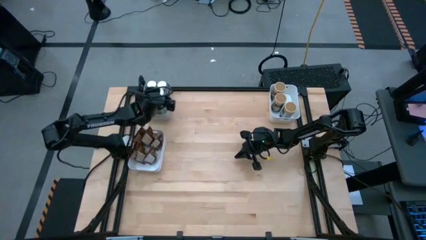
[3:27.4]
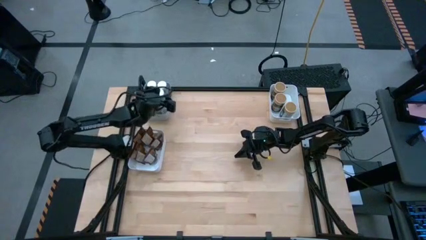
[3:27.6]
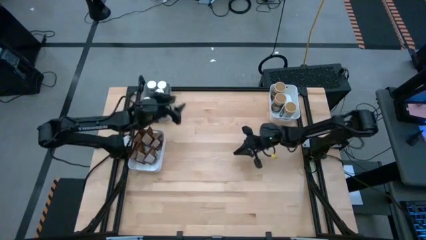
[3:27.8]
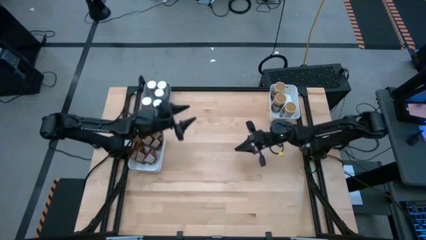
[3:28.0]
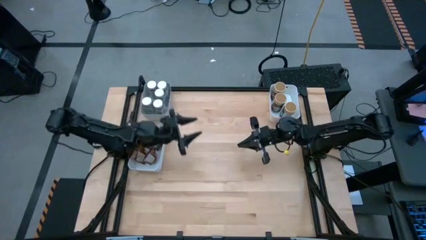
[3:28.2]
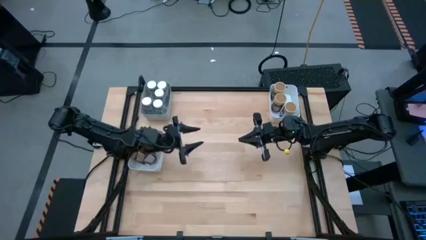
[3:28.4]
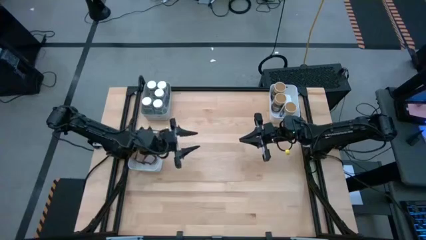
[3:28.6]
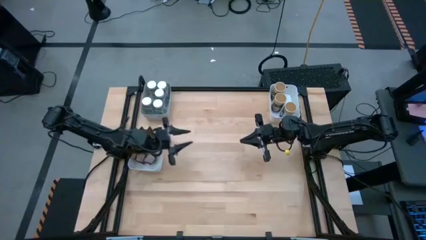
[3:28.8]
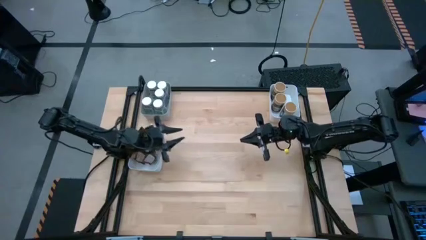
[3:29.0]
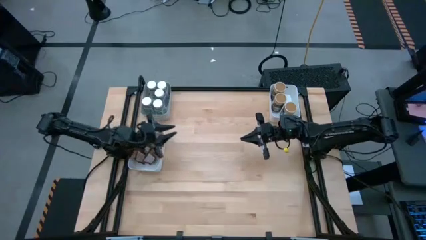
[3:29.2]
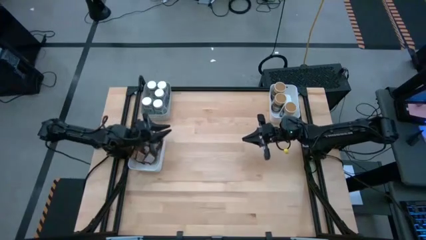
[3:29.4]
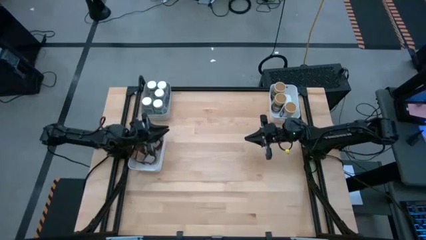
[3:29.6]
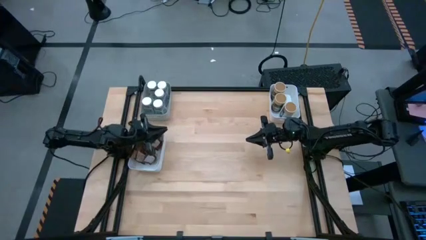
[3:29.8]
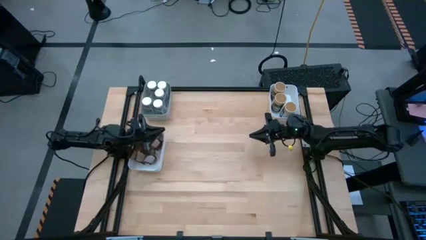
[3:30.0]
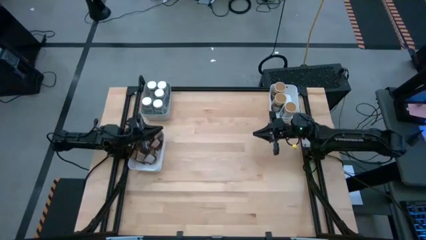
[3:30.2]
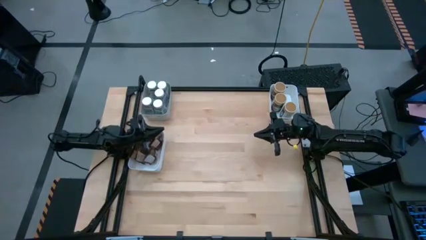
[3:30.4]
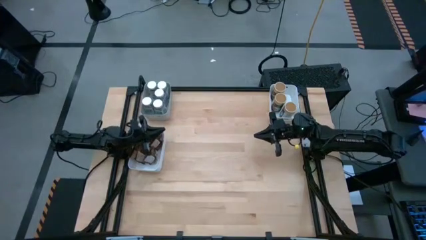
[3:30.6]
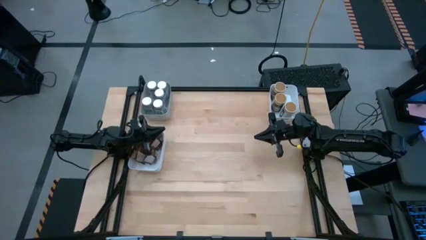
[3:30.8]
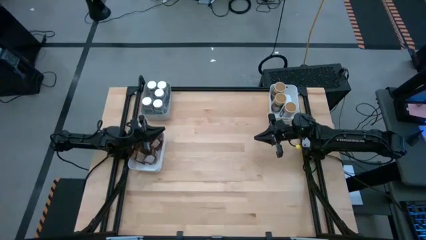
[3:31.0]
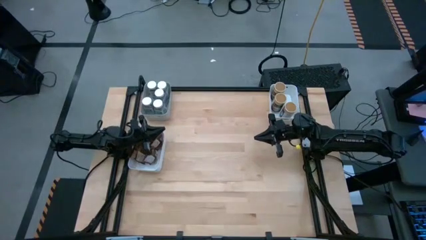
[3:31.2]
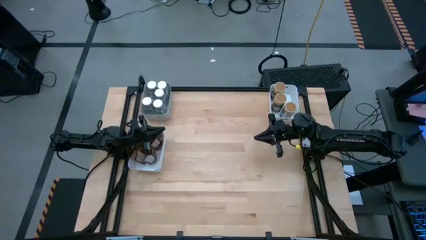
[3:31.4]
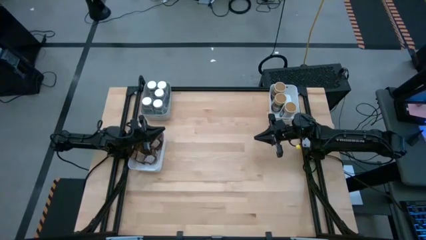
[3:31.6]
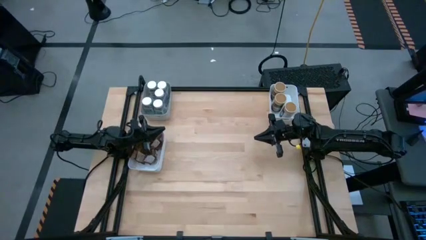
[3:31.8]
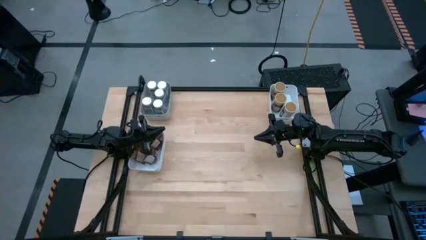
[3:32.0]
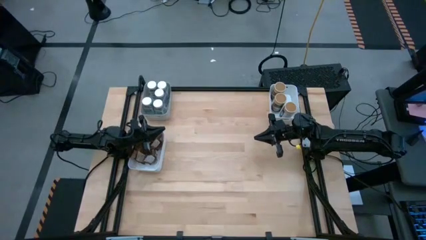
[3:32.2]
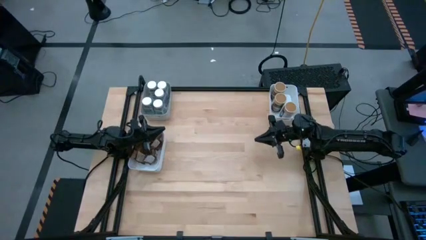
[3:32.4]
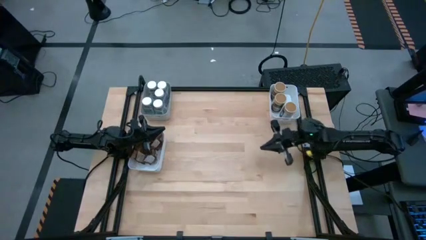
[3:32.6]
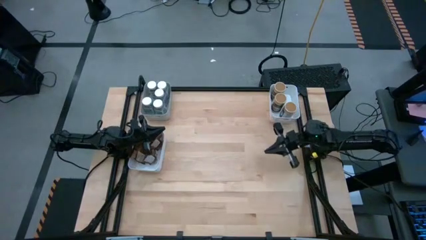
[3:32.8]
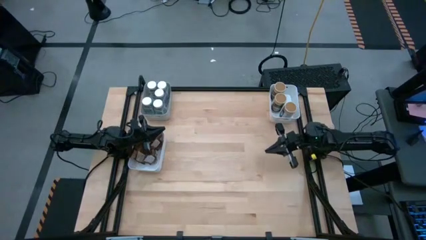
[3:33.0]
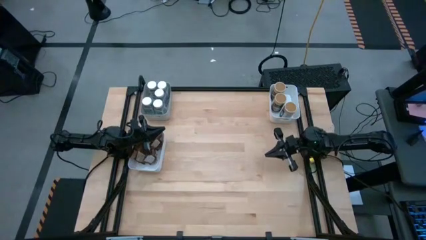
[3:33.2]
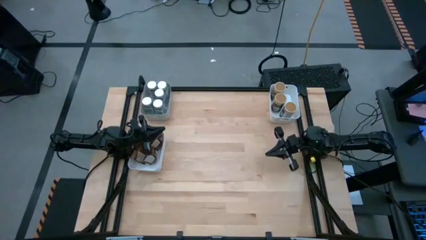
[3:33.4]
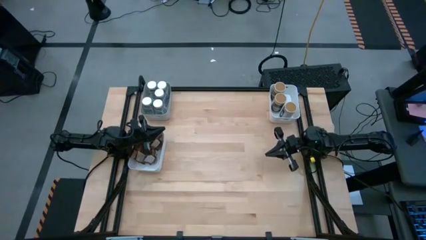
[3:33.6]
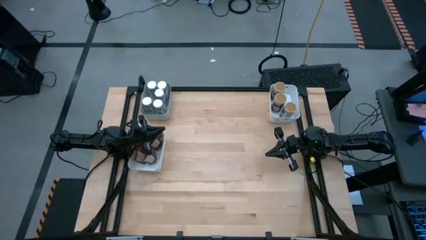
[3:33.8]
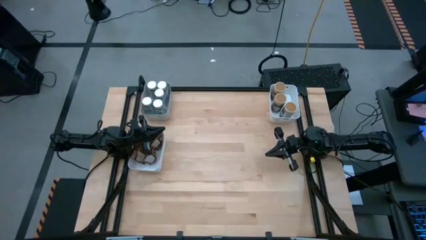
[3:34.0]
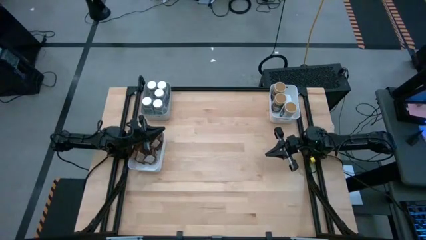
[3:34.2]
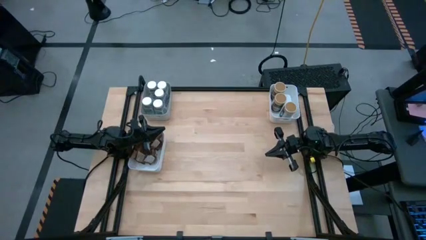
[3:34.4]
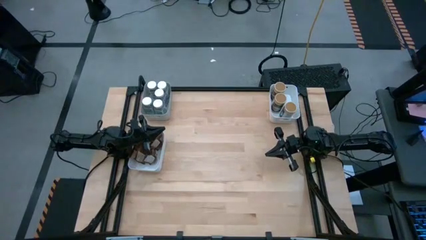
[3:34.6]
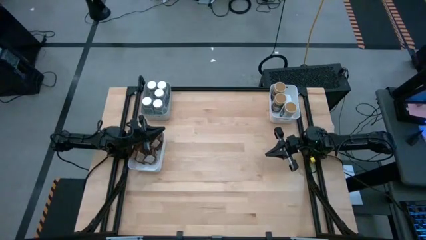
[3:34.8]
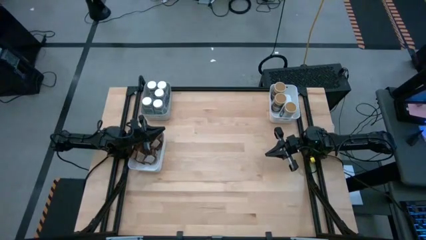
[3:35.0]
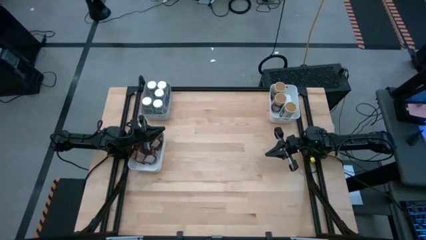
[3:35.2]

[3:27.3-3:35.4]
Task: Sort spices by type
Return to Home Position

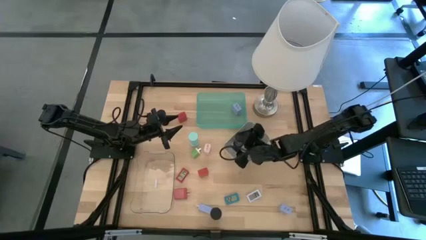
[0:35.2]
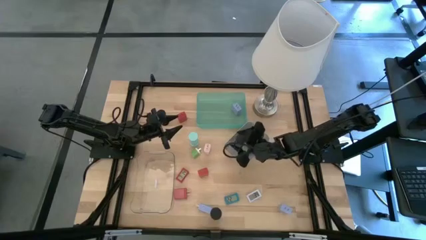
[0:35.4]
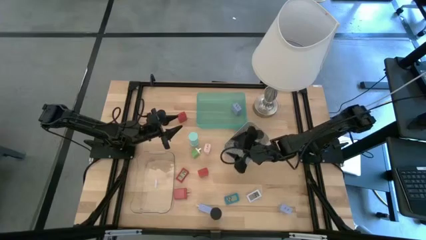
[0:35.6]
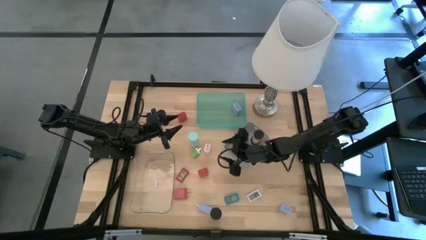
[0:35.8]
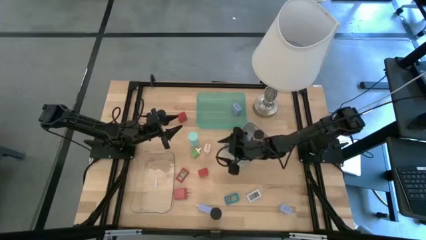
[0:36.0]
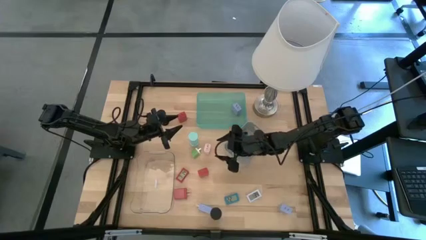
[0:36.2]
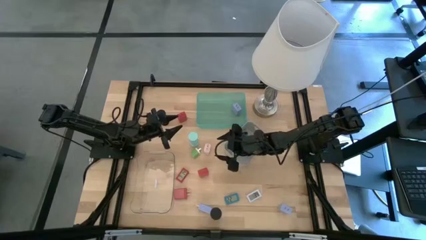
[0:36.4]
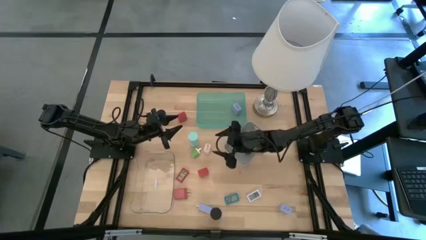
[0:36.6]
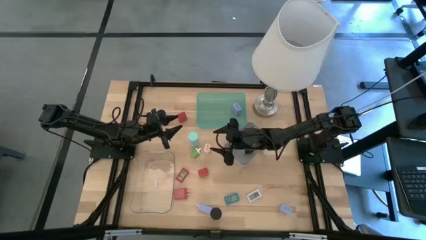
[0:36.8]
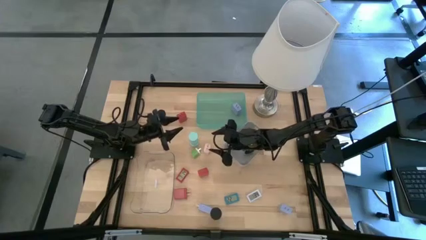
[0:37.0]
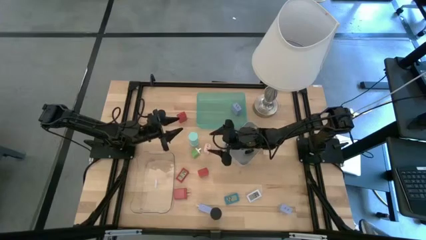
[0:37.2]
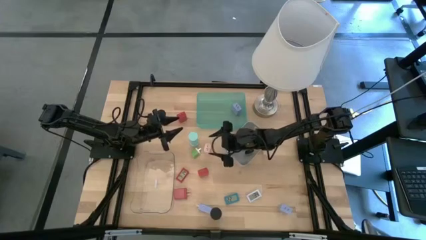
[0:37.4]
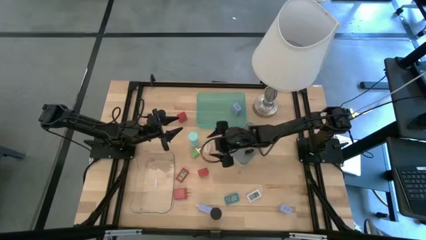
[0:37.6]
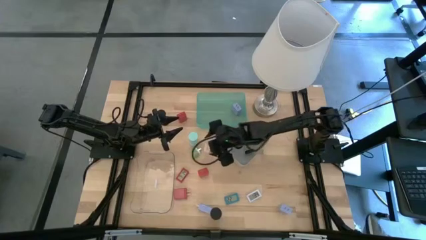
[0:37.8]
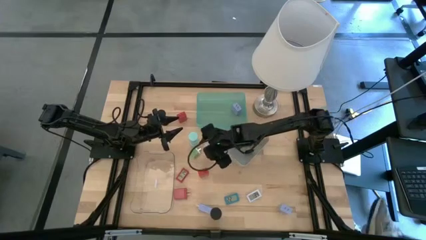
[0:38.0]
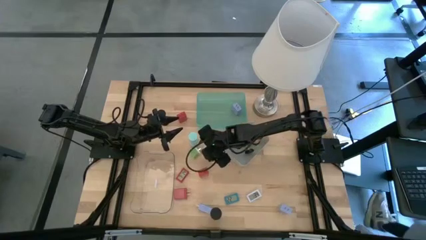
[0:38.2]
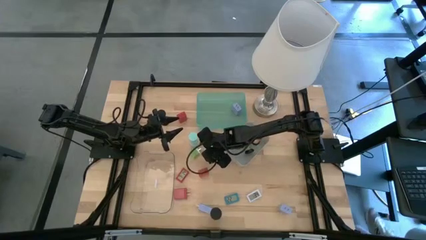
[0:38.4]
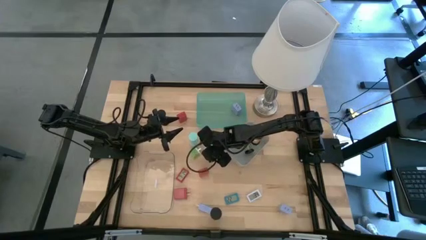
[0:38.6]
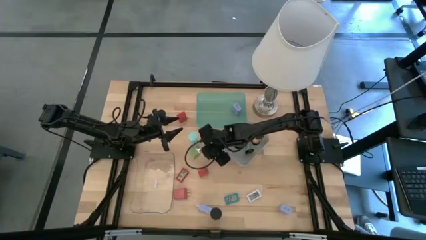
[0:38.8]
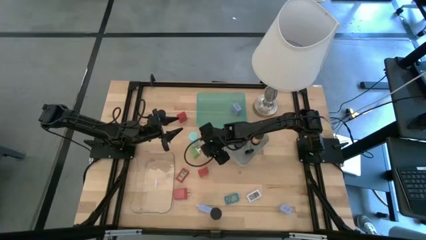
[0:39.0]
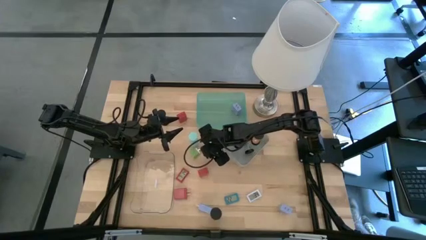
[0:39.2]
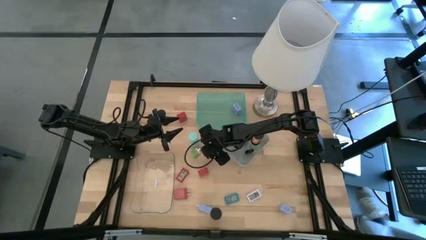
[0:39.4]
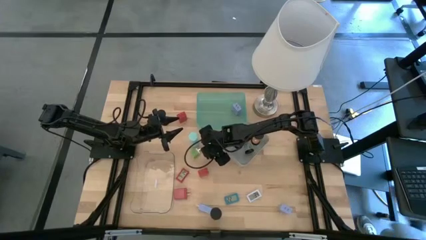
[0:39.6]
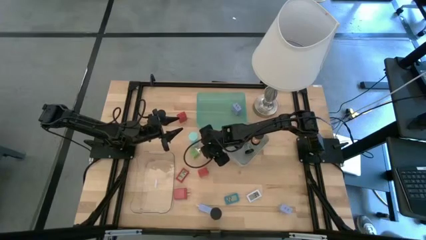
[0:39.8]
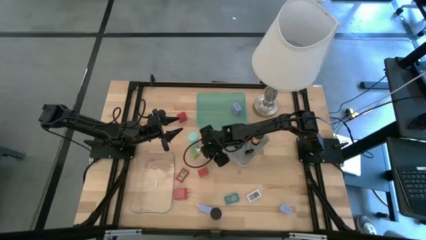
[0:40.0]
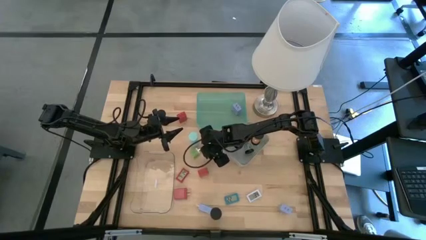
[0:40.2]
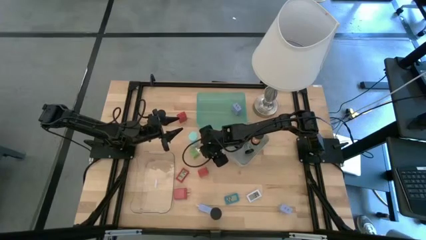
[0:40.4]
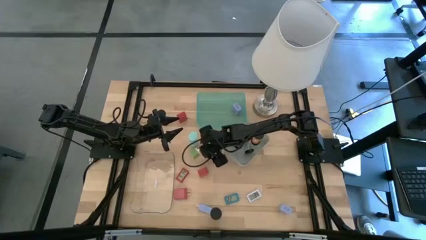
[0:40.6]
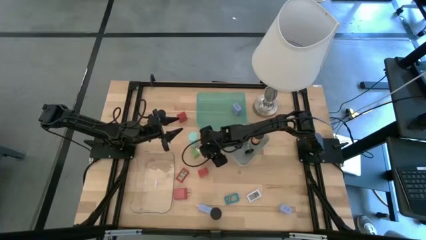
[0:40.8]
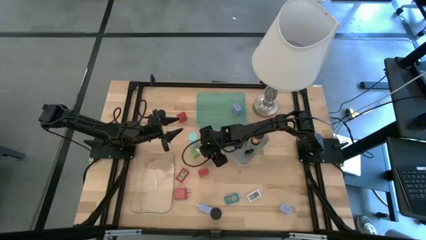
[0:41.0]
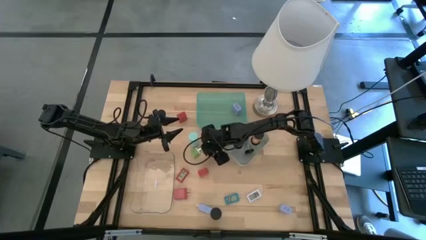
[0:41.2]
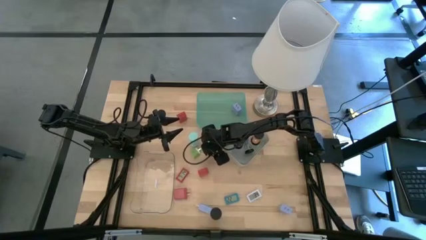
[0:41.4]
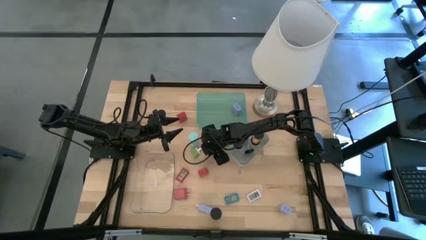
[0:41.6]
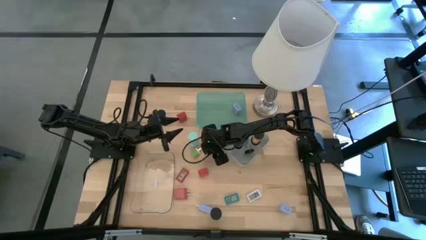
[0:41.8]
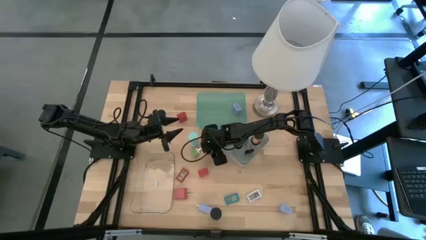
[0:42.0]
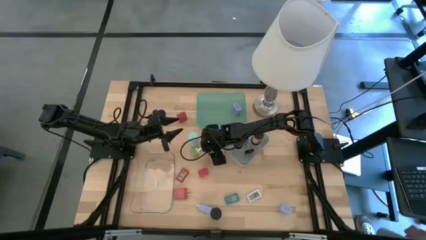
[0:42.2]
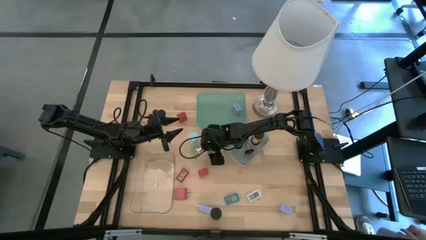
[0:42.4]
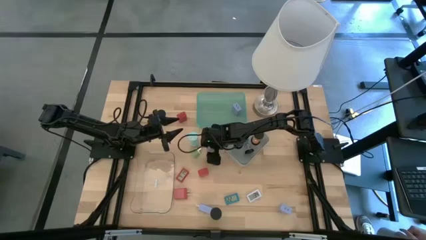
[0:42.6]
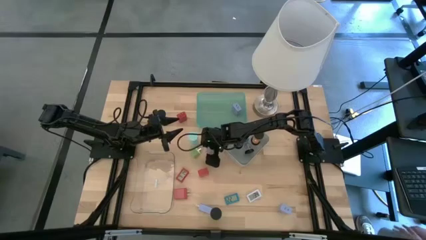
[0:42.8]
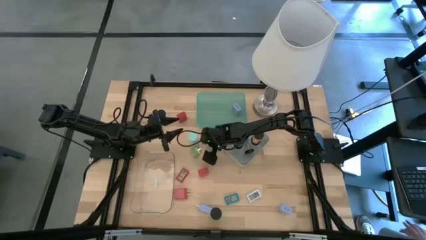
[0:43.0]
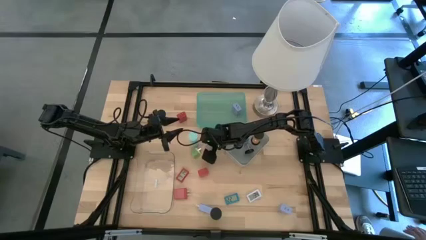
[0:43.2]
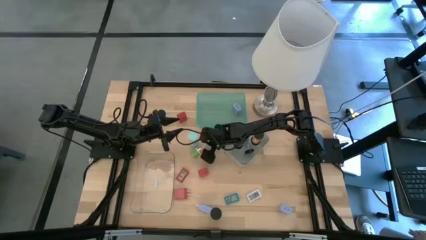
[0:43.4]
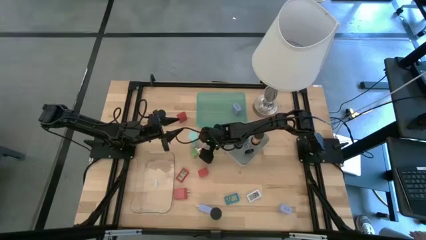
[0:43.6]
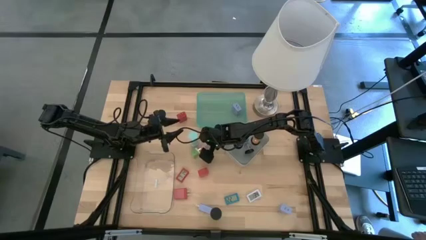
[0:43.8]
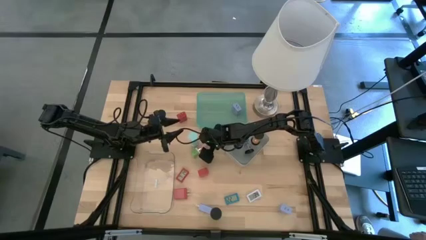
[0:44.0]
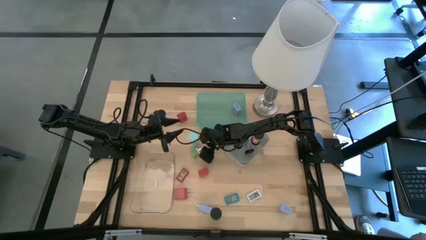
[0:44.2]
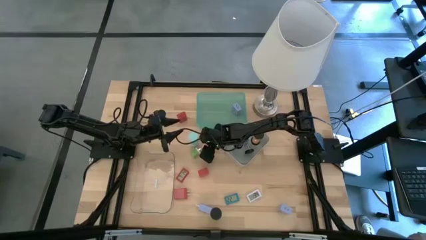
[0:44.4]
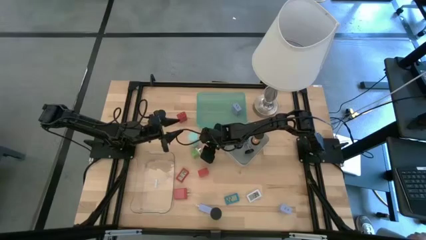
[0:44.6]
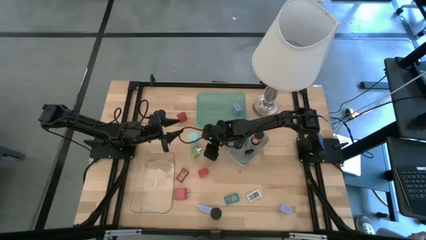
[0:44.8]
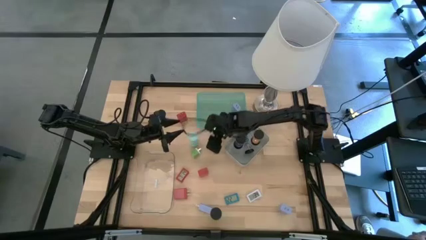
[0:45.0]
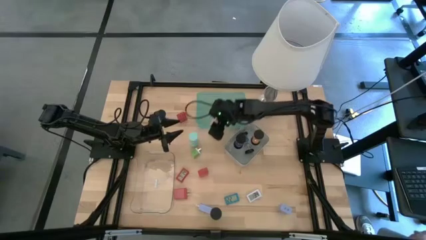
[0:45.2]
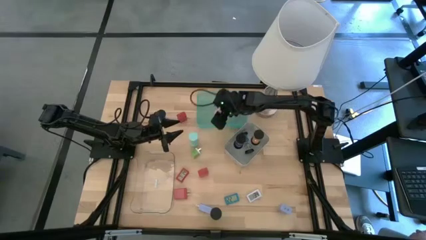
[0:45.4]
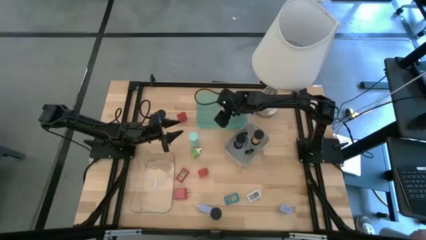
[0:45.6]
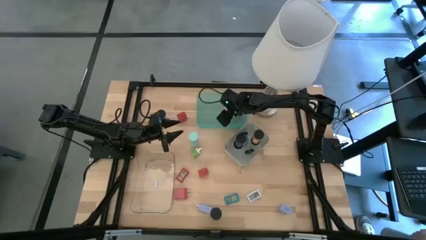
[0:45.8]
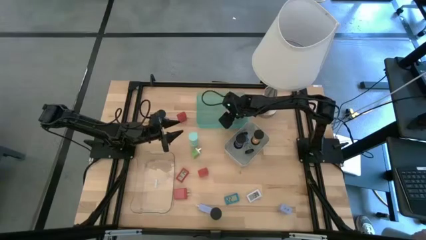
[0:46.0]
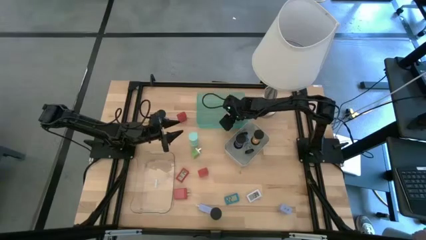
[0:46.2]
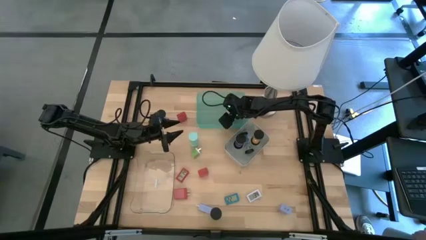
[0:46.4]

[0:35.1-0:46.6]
Task: Pick & Place Office items
Put the light pink charger adapter into the green bin
